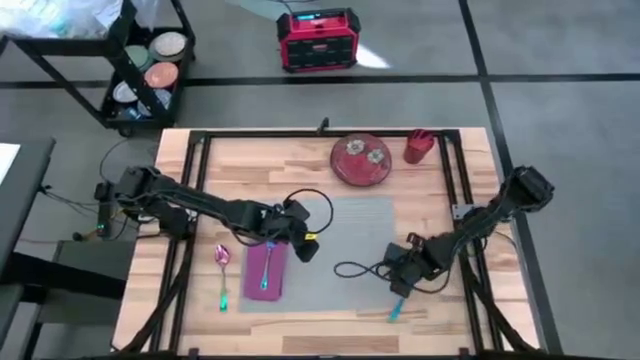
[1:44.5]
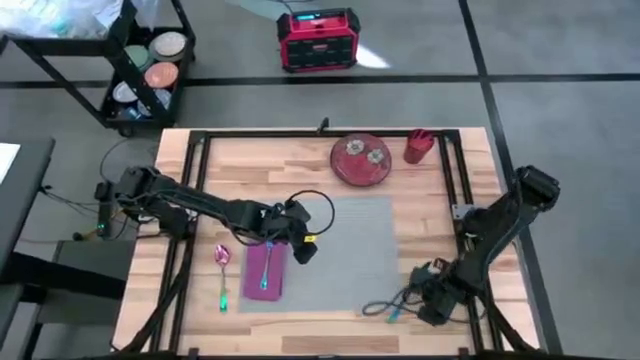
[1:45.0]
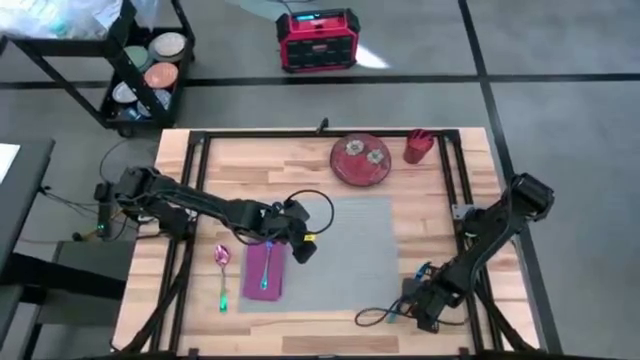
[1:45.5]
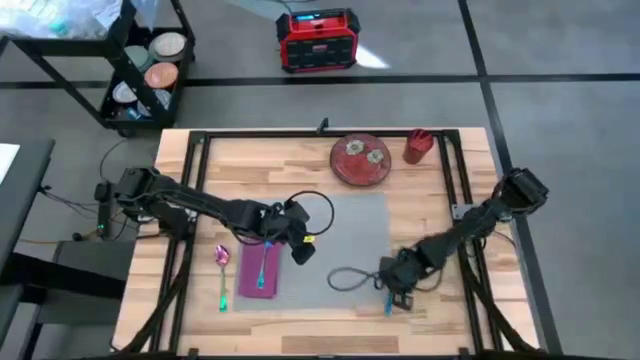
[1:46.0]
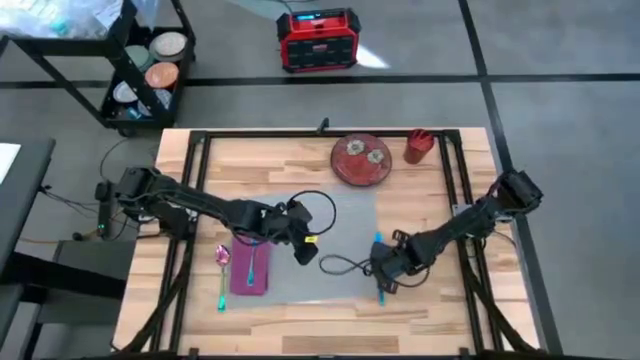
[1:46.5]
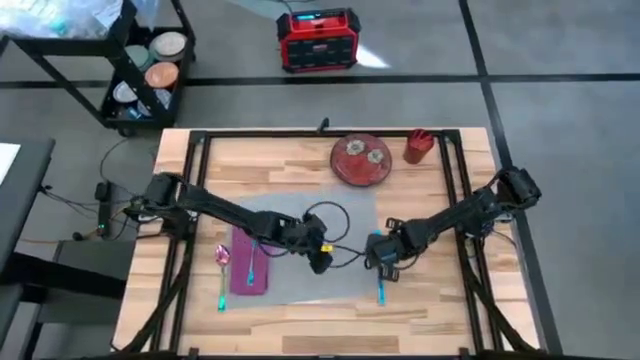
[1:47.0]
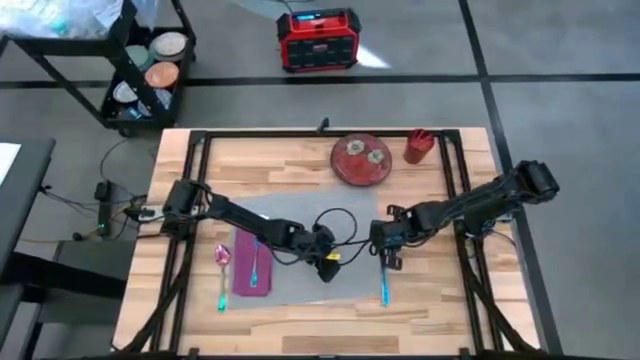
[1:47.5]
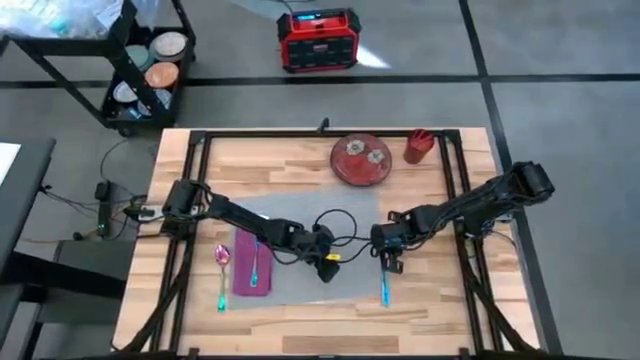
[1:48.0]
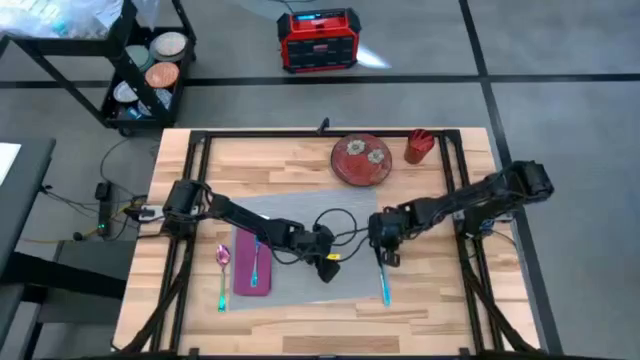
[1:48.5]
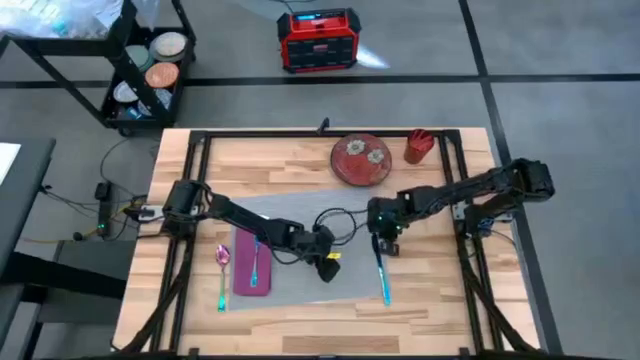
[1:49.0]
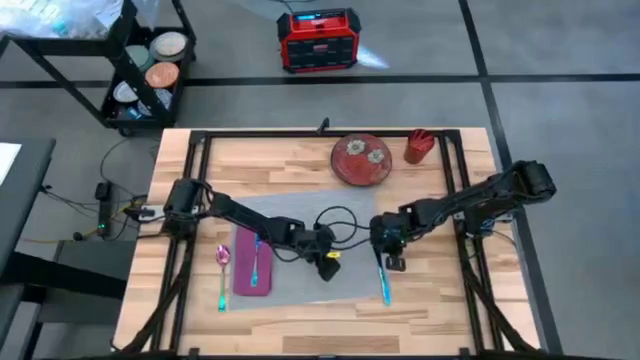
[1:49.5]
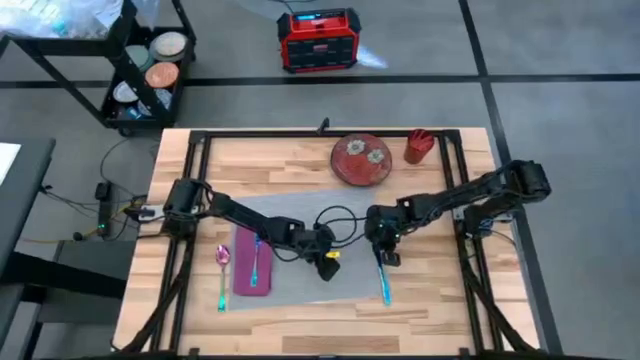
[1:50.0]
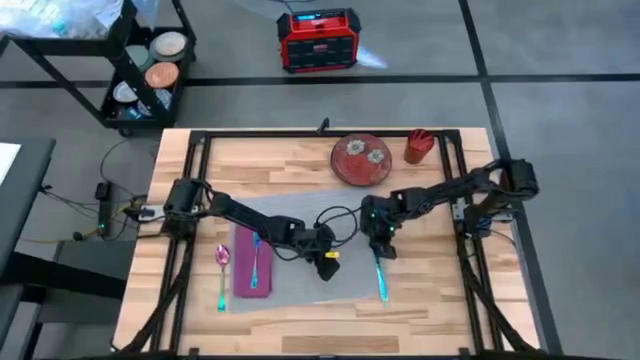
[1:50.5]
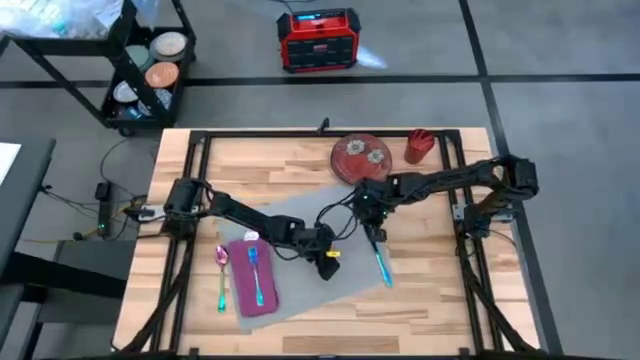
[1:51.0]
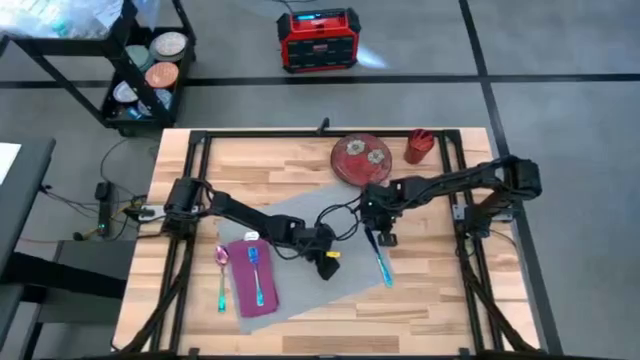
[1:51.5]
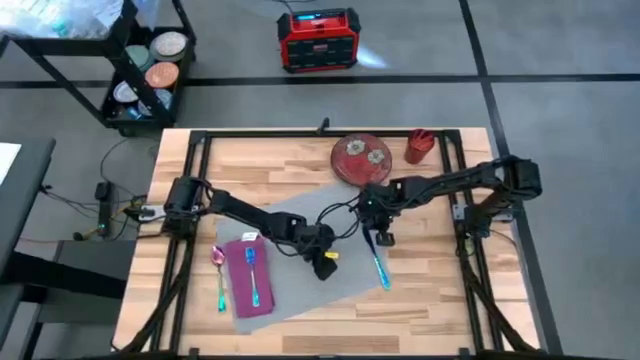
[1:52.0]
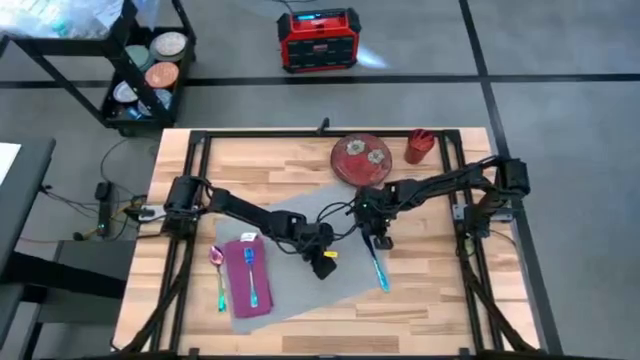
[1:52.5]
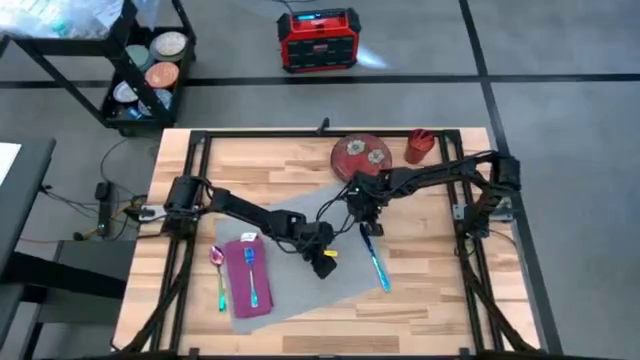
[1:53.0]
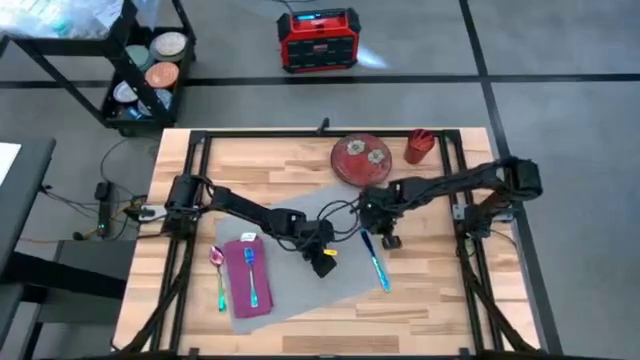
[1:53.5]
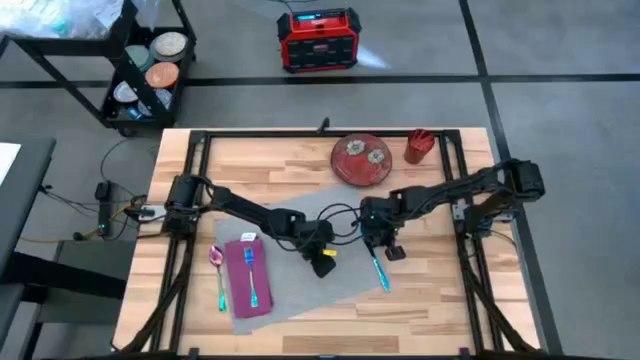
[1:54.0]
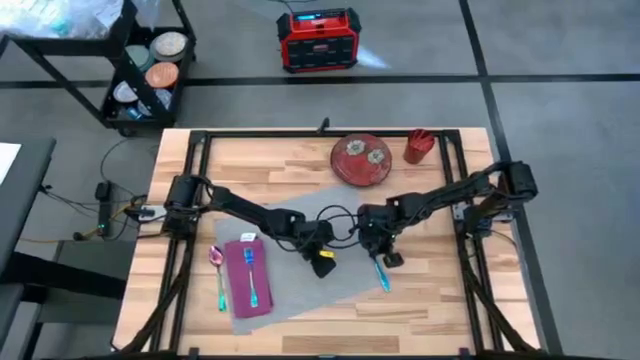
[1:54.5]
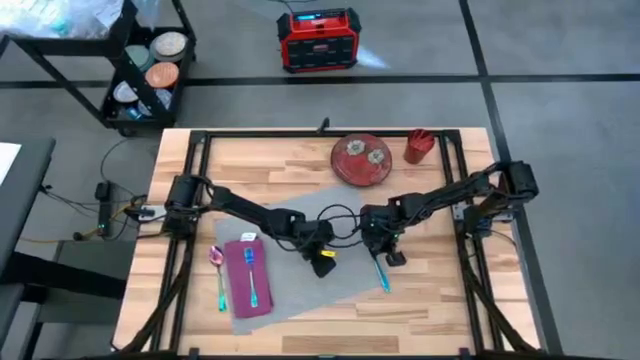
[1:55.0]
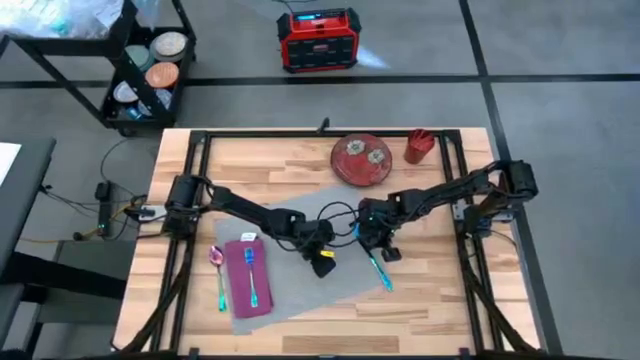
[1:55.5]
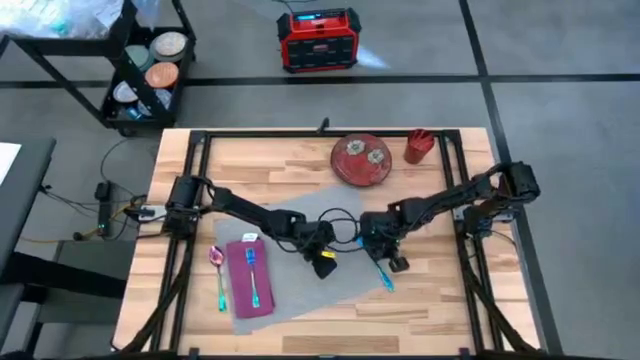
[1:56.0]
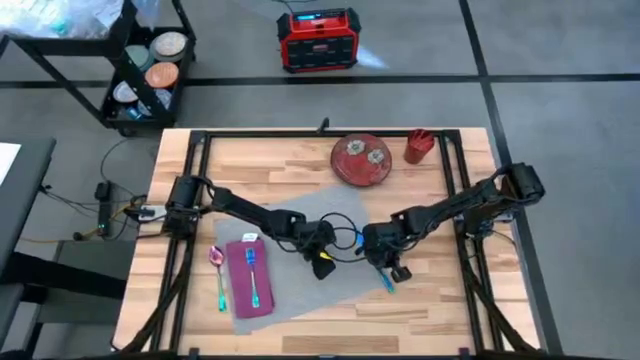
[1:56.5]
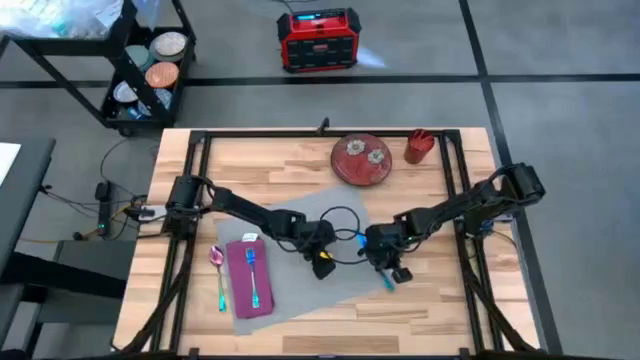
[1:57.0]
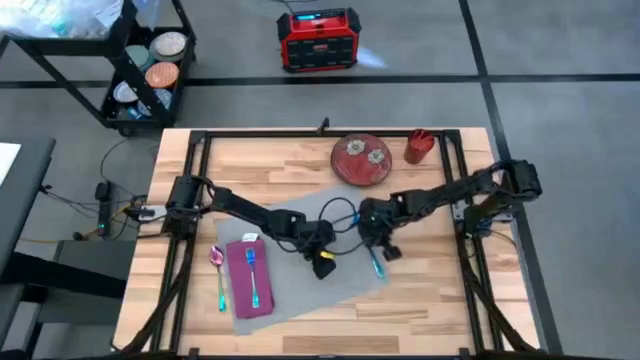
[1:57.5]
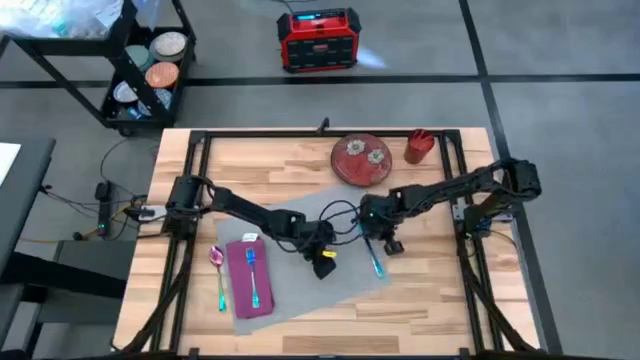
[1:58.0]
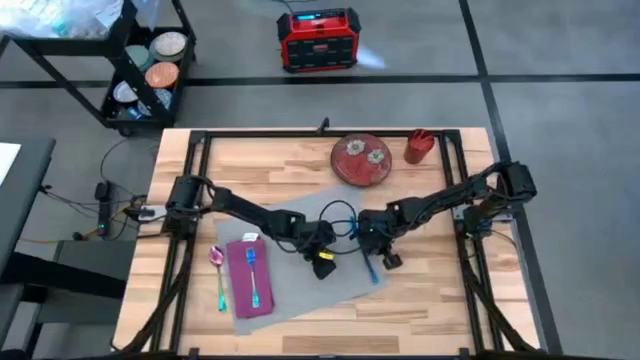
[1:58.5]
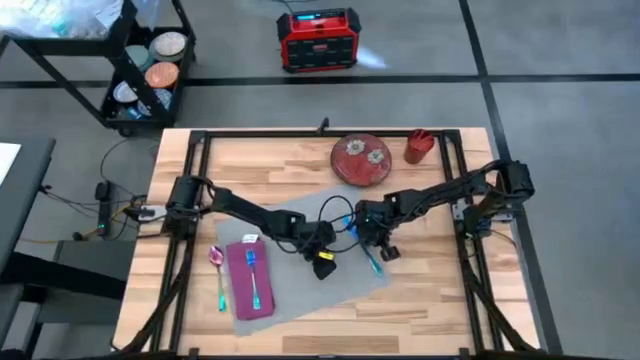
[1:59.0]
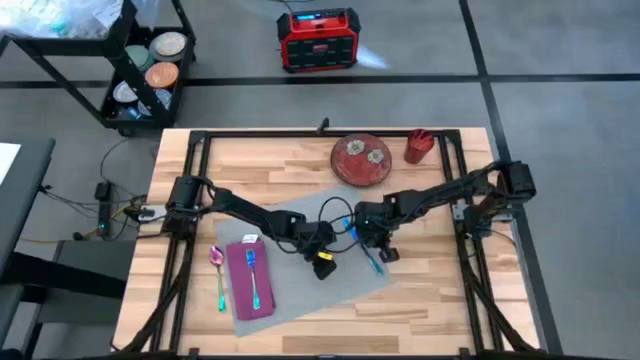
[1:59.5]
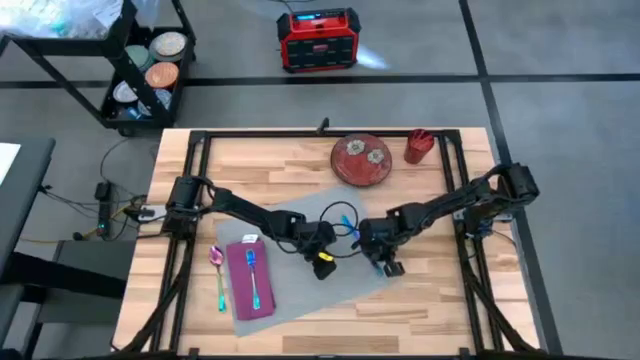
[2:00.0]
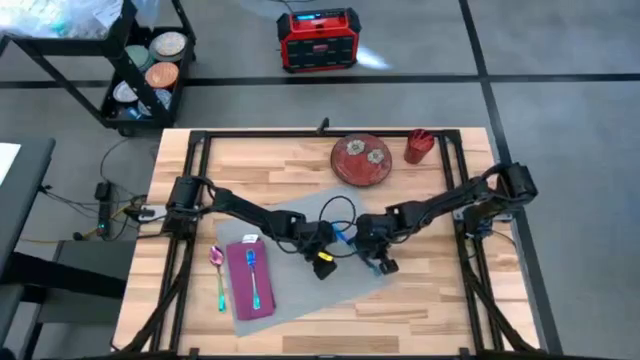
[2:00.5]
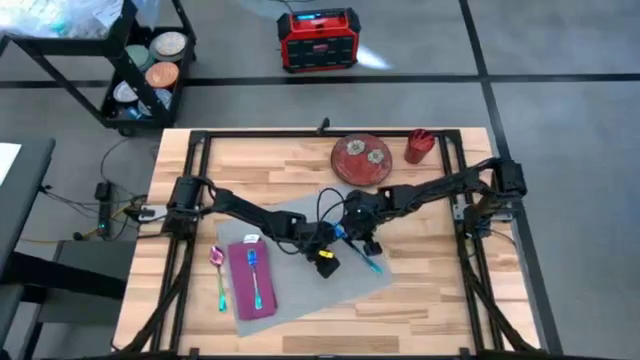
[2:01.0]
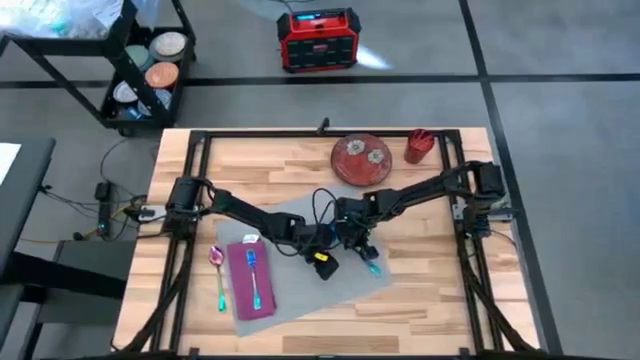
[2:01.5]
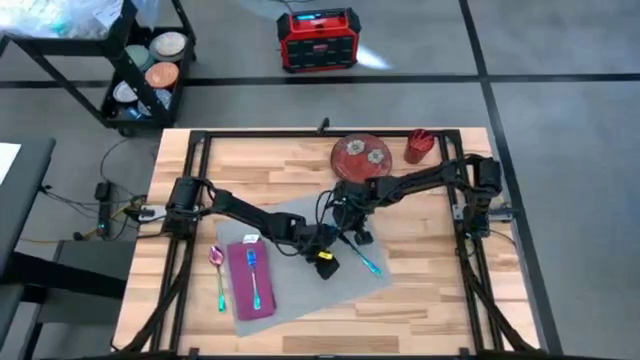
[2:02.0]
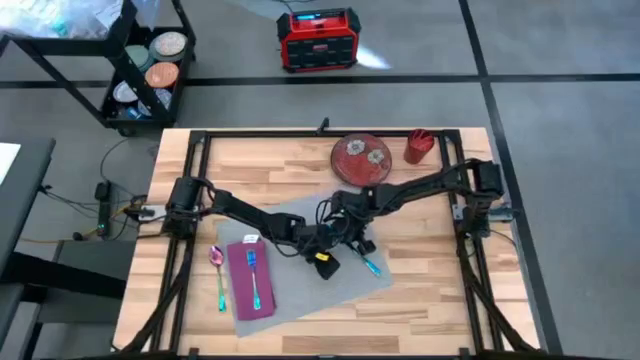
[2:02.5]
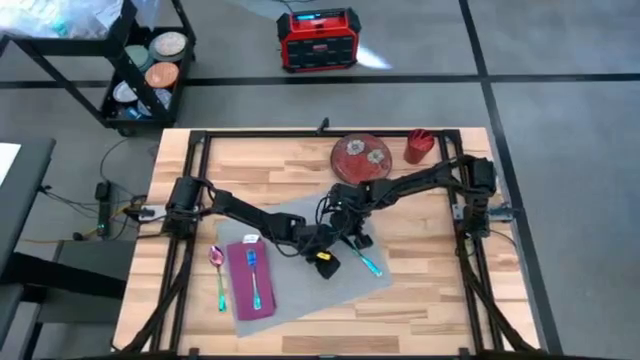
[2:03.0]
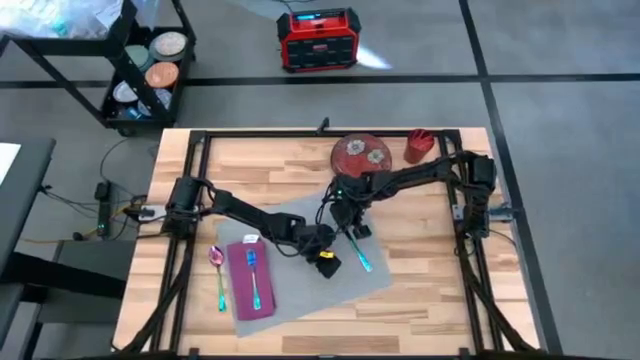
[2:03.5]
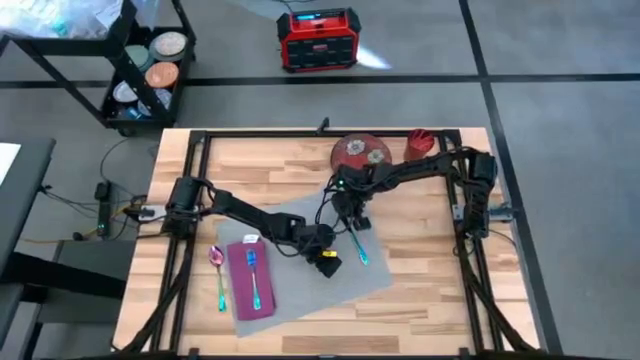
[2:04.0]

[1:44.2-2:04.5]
Task: Set table place
Put the blue table knife on the gray table mat

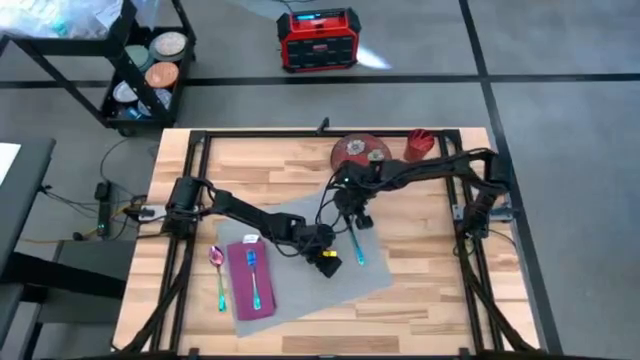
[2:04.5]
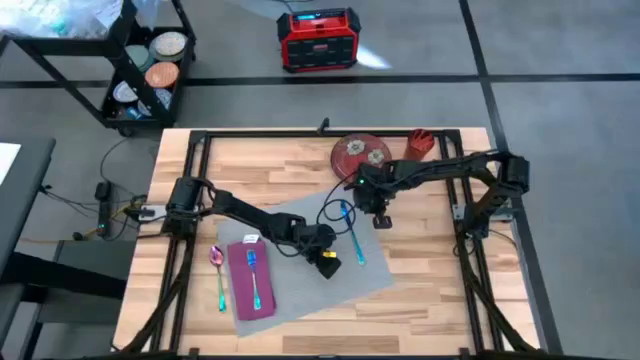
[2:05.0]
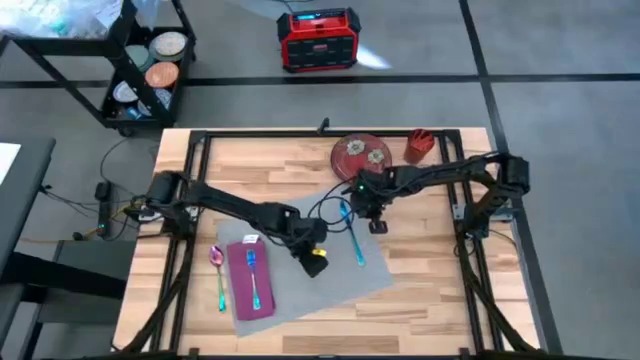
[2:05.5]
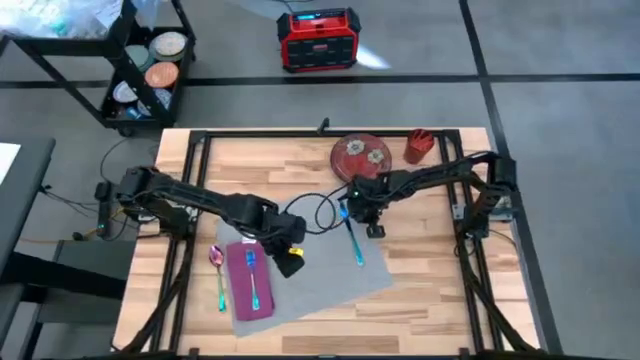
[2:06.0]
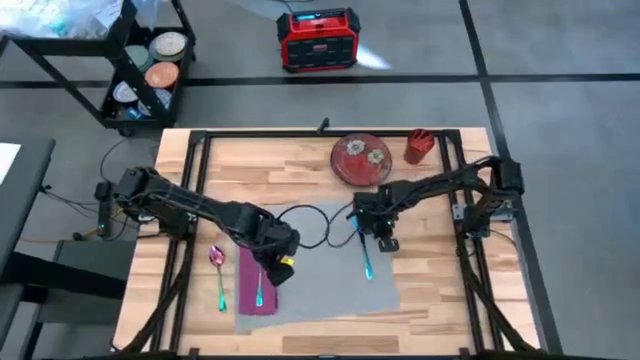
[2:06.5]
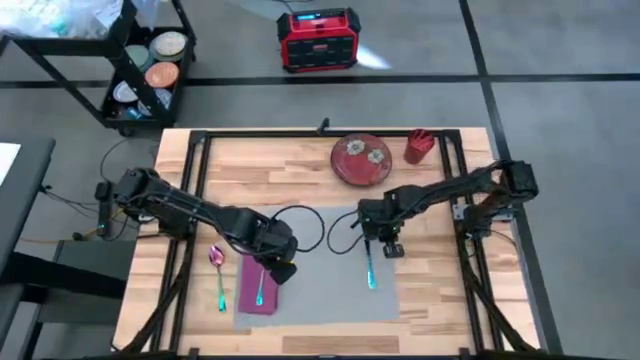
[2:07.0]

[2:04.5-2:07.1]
Adjust the gray table mat
